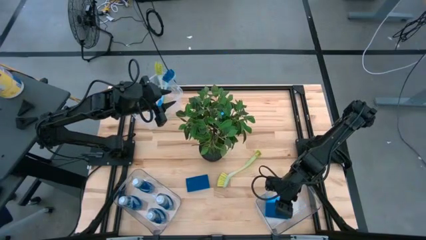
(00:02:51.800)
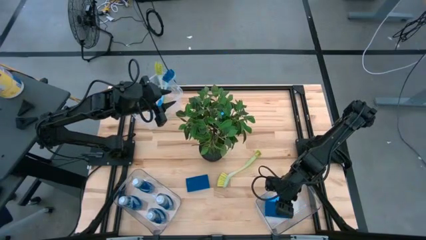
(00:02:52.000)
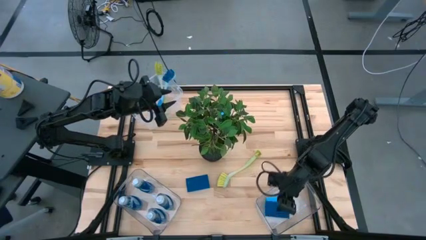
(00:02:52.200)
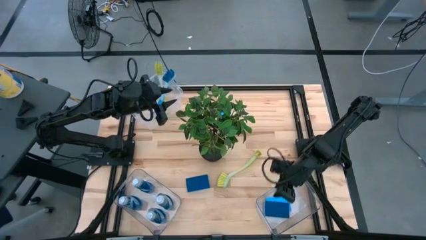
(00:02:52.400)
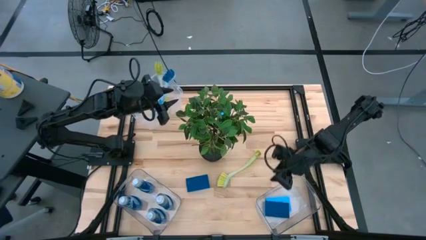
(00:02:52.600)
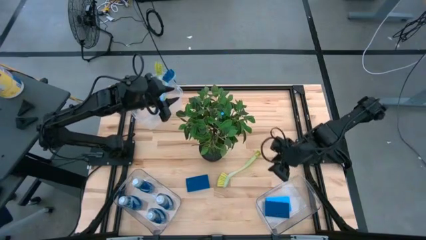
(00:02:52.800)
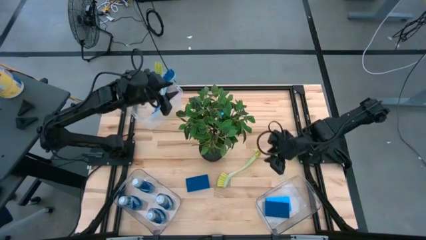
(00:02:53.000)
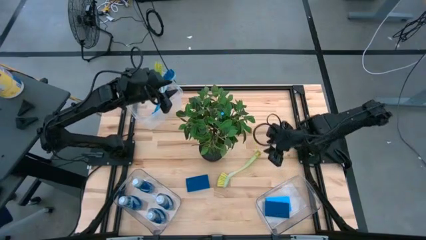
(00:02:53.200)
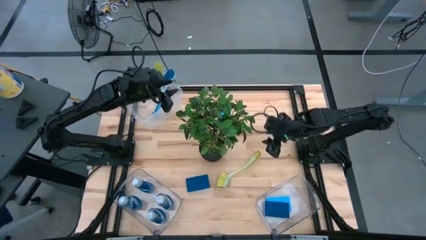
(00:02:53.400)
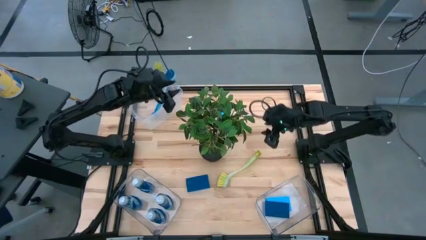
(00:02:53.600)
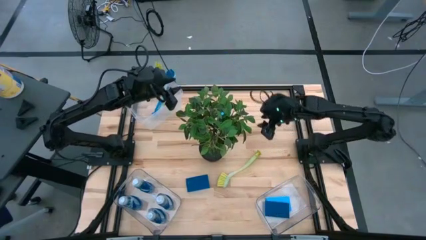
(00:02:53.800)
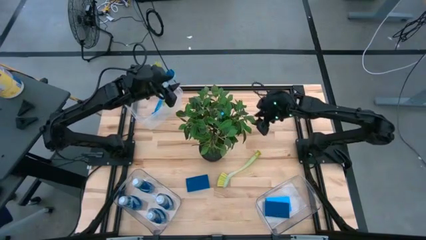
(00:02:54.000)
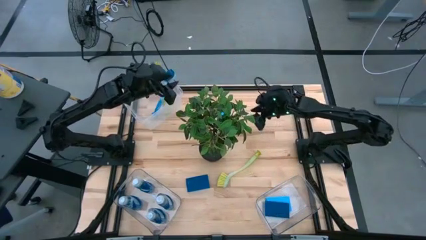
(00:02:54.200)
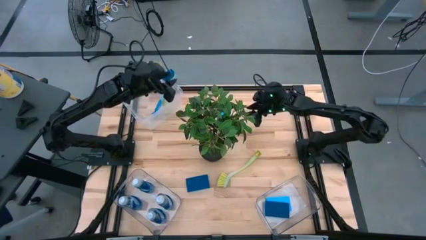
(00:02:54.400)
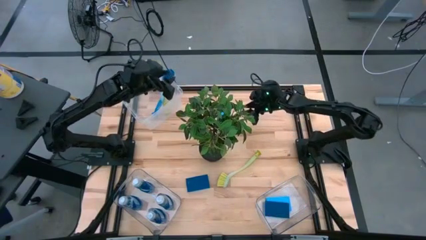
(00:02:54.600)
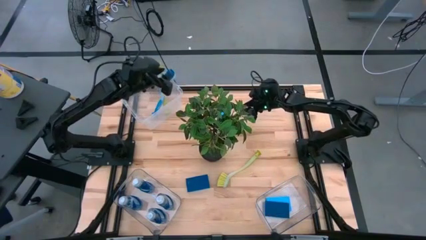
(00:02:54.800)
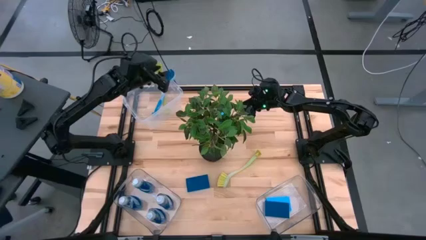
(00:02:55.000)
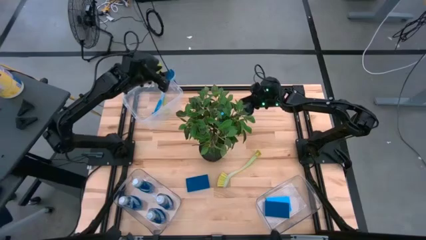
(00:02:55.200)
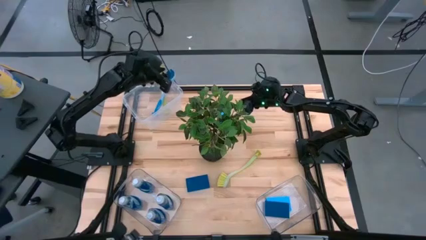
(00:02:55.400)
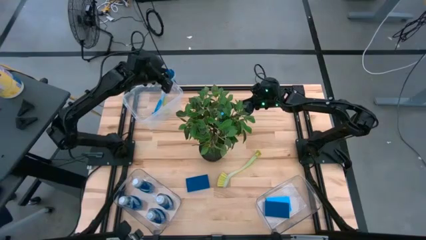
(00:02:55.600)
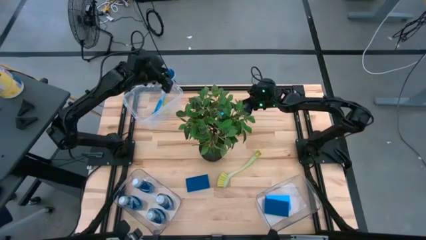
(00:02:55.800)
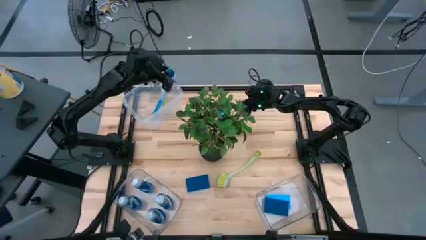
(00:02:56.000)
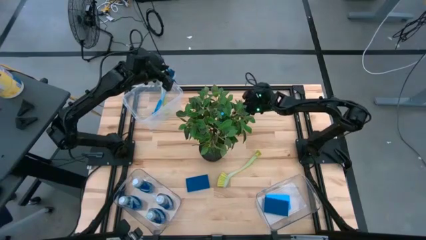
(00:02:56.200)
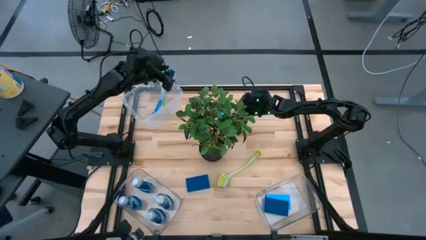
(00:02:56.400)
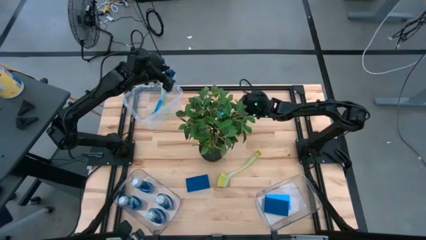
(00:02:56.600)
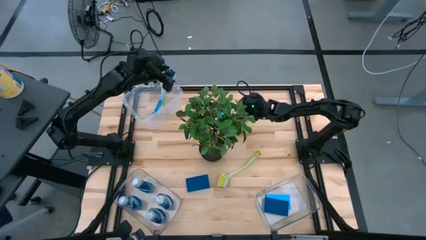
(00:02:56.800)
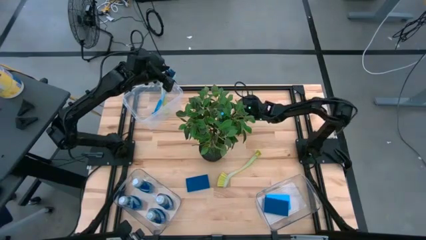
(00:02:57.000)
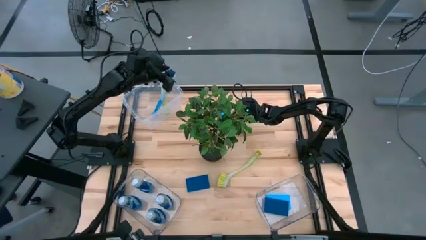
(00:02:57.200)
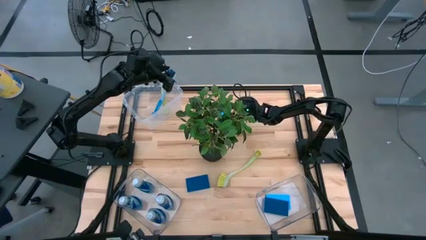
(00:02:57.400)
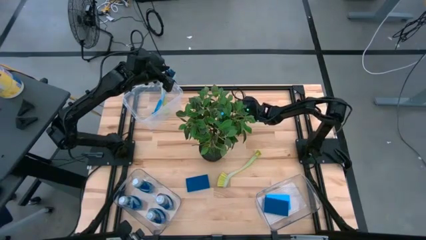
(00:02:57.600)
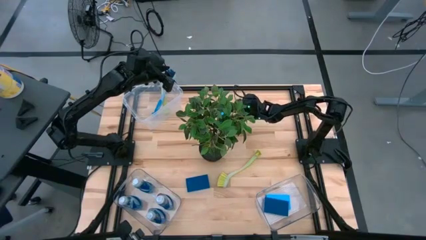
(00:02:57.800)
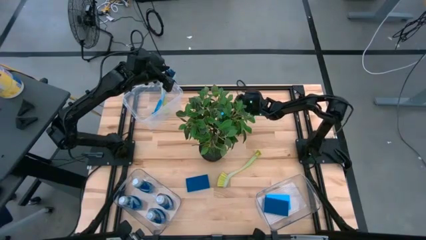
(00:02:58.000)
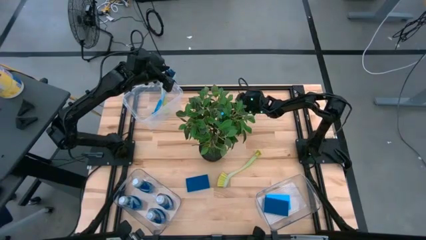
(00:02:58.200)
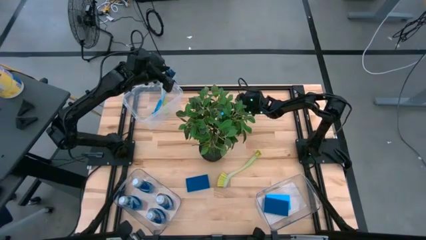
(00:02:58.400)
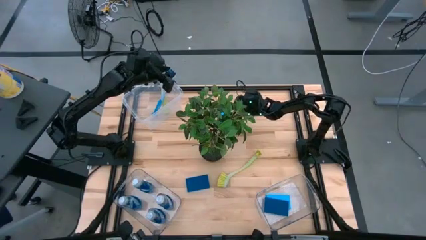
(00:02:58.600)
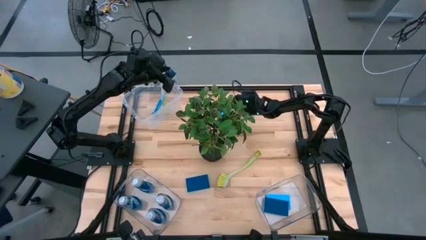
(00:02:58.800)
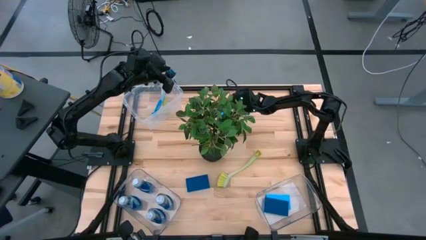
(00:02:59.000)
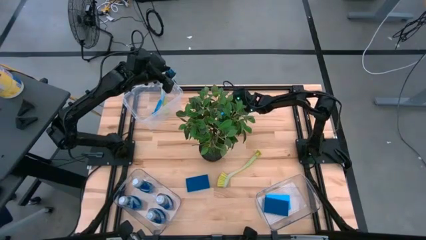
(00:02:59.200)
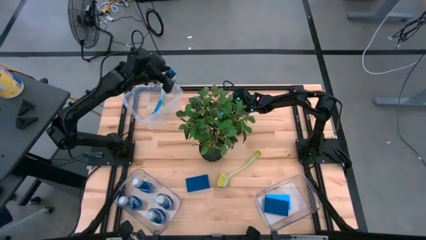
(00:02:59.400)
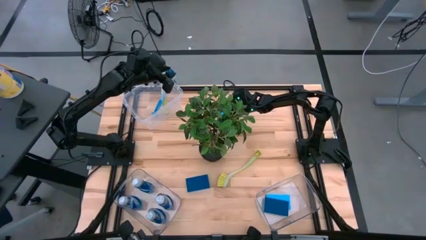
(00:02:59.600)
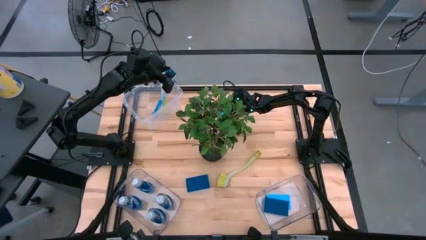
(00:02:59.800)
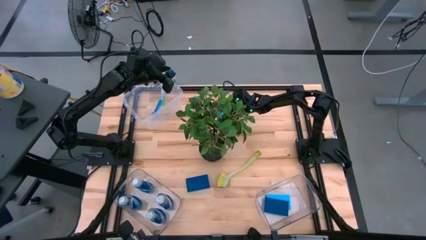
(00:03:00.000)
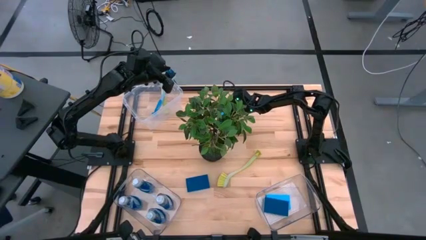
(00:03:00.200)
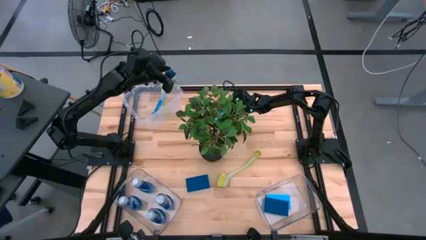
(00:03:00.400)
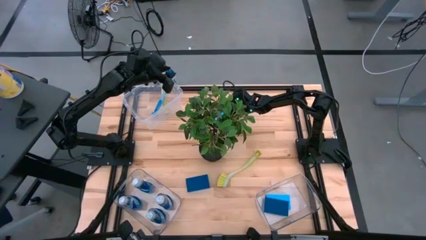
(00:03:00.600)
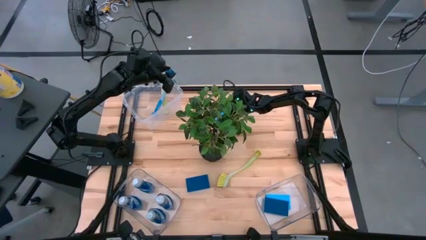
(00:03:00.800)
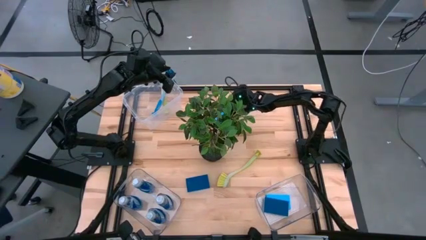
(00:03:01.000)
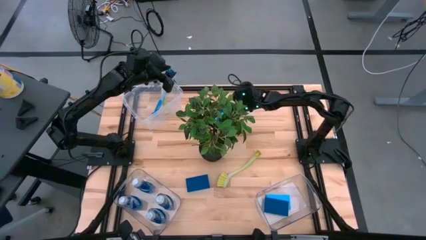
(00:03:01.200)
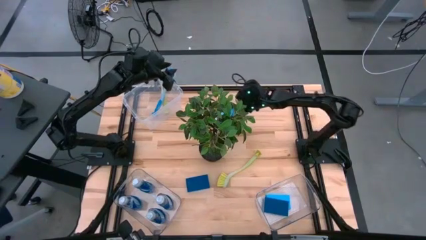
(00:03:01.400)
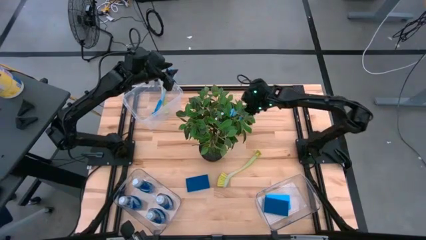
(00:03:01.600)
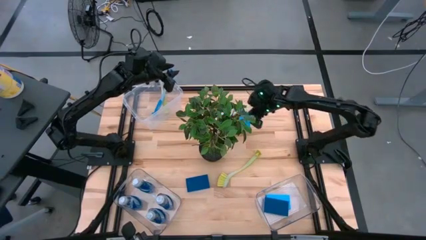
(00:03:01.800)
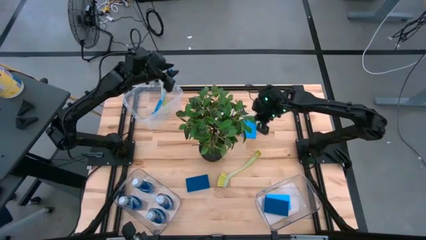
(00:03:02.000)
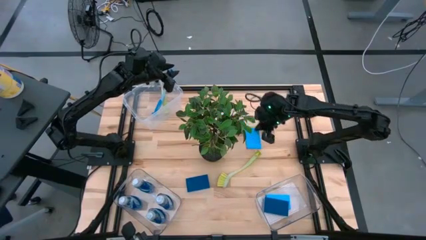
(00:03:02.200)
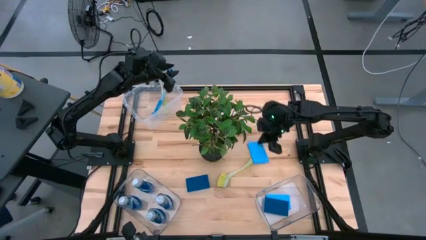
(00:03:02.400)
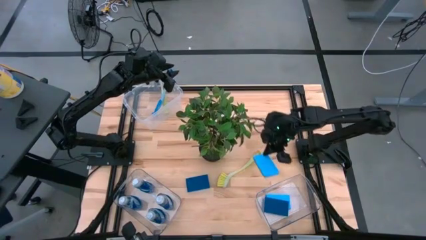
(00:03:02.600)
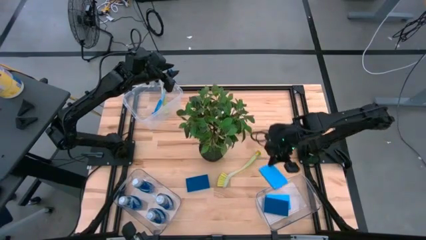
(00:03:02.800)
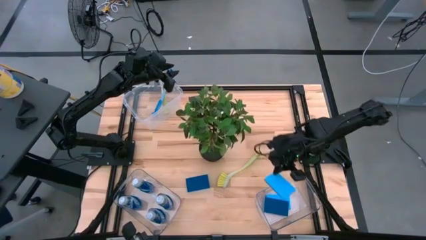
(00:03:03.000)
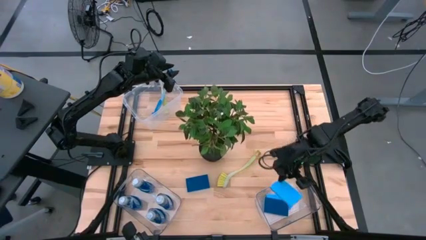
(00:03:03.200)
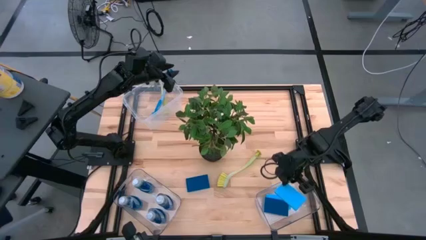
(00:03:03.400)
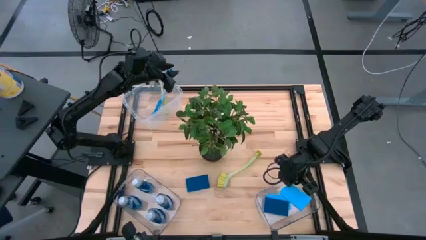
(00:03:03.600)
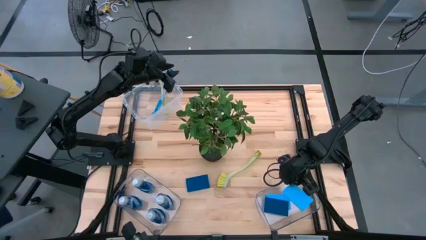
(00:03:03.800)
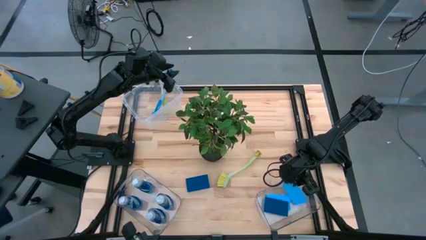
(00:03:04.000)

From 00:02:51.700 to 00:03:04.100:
Task: Pick & Place Kitchen Sink Supplies
Put the blue sponge into the bottom right transparent bin

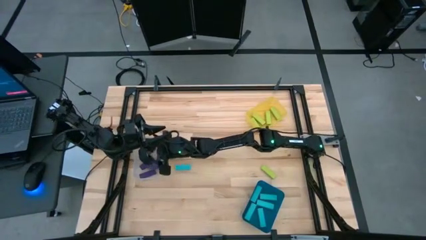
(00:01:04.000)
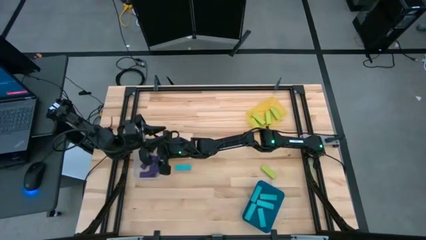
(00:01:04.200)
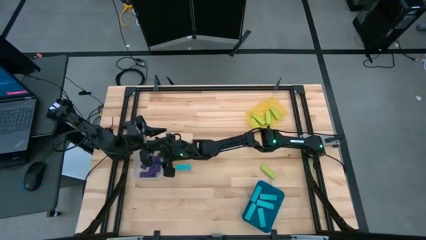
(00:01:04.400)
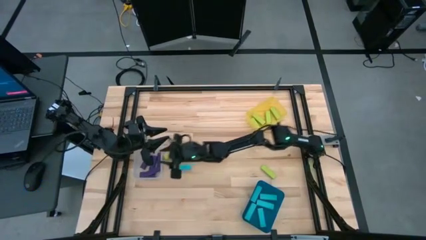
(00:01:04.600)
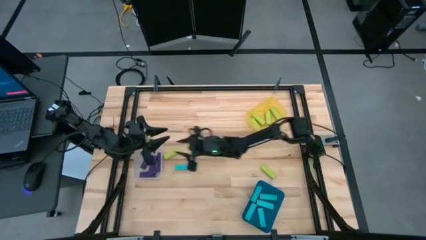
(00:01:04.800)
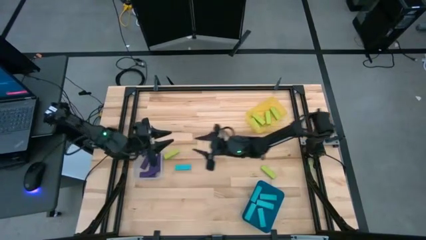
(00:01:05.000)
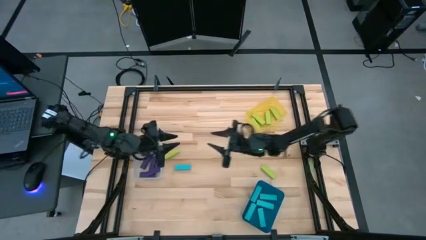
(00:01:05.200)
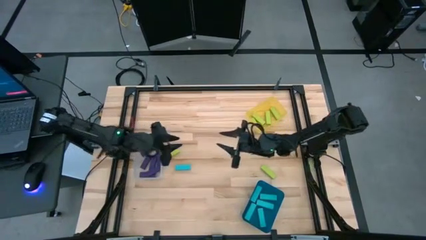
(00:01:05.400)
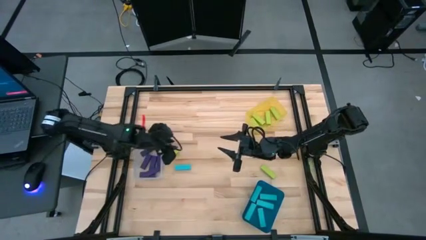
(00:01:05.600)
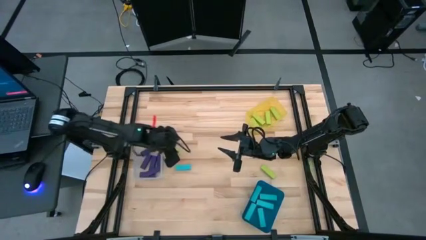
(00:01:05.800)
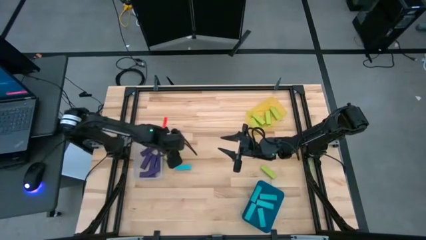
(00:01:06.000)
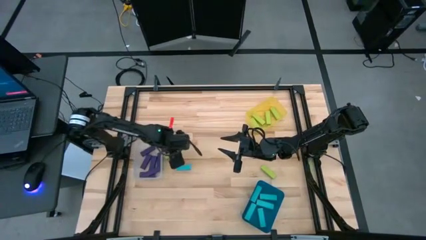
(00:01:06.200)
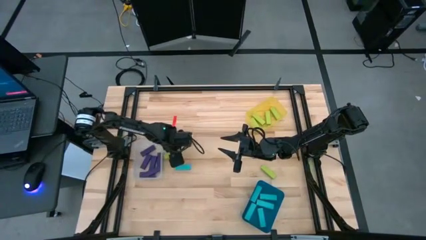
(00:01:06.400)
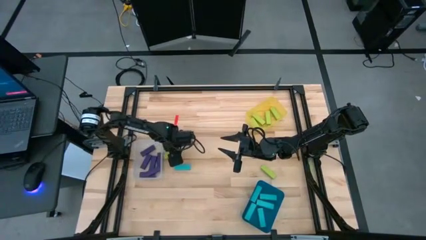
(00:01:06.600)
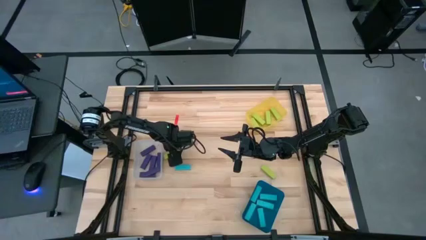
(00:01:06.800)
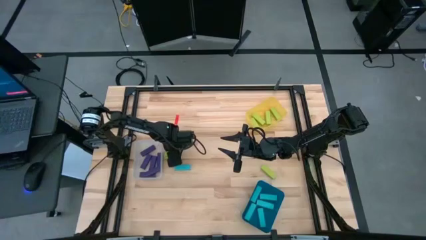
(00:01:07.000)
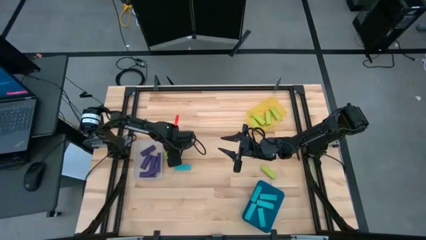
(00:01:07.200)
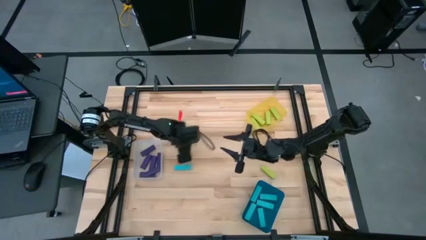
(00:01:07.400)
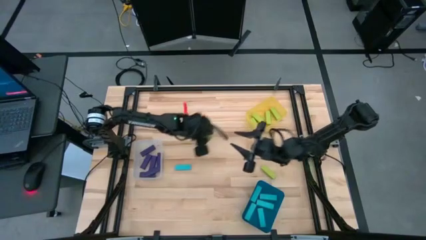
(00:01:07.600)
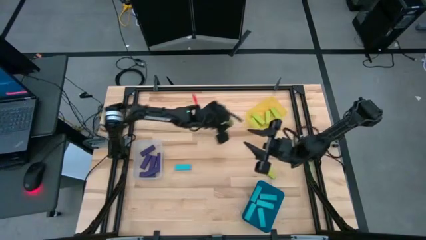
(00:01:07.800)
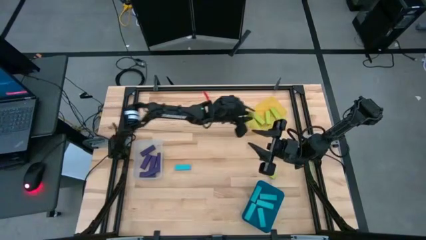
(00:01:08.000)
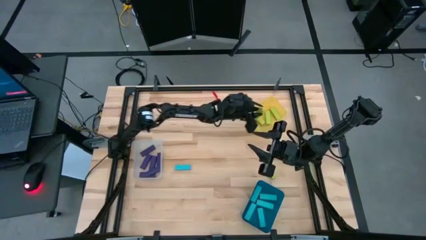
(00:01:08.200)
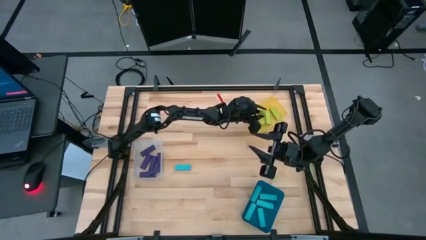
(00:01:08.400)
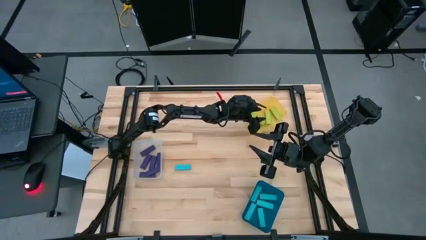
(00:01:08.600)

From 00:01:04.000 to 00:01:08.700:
Task: Sort blocks
Put the green block into the yellow bin
